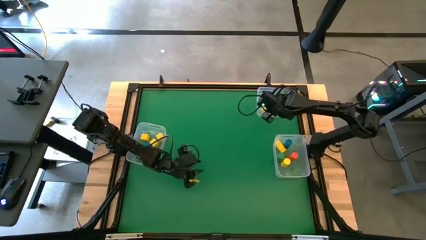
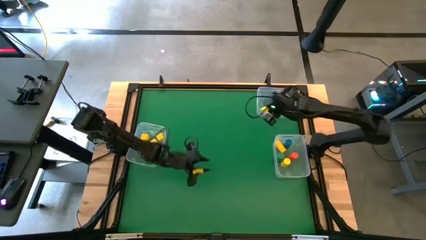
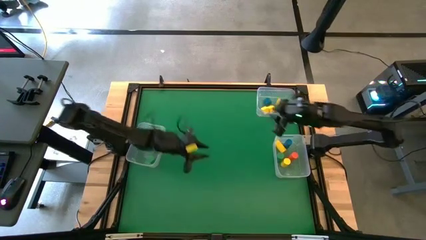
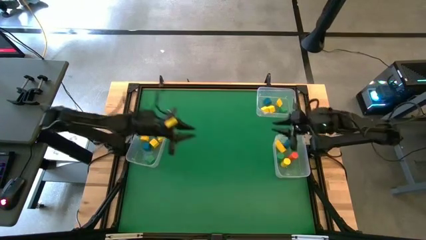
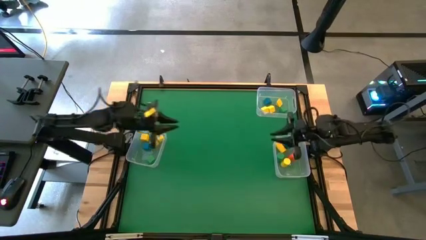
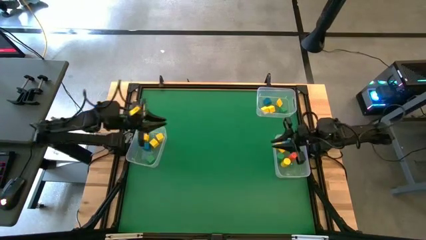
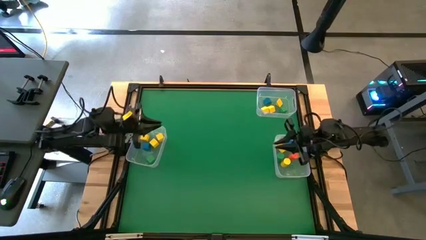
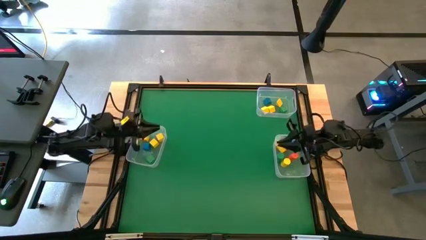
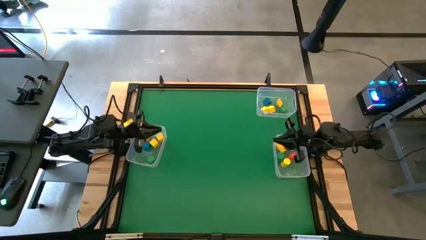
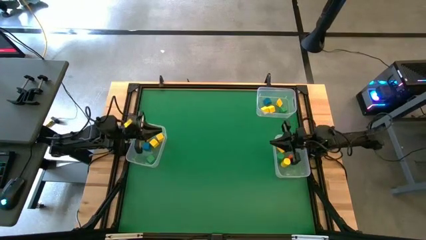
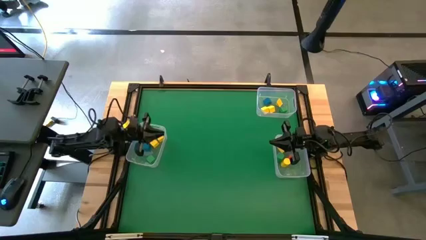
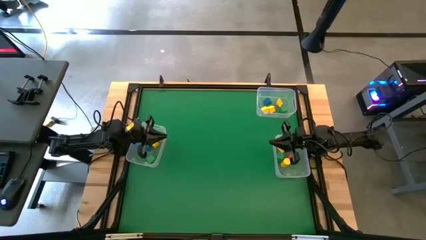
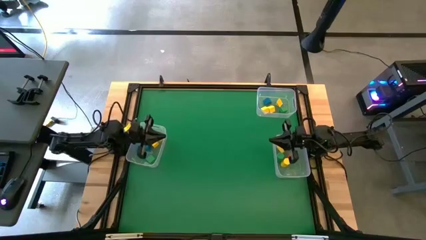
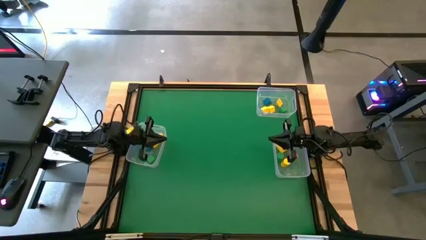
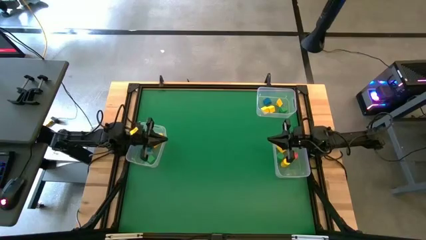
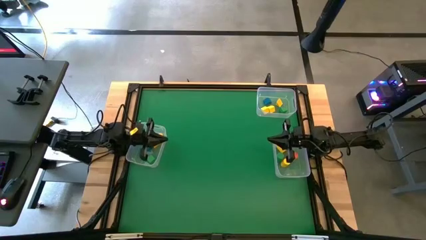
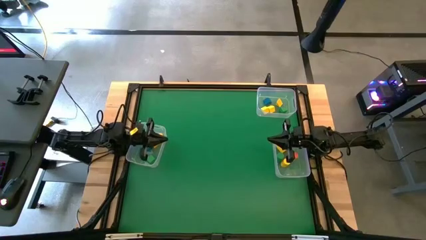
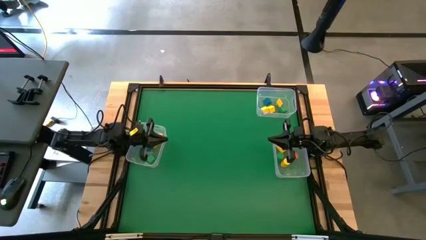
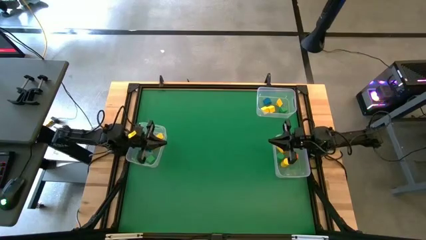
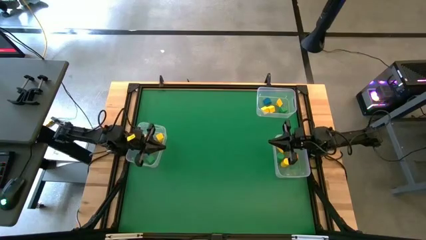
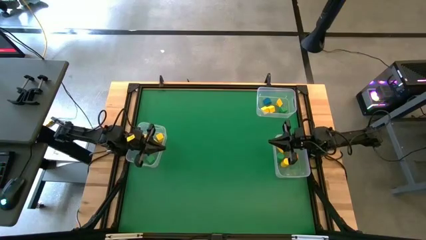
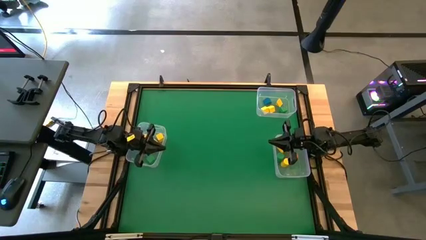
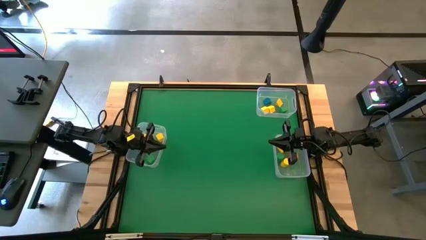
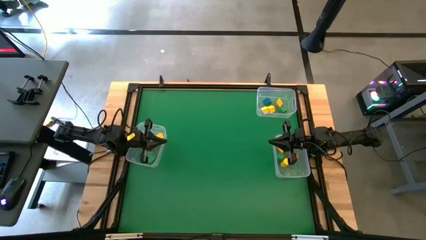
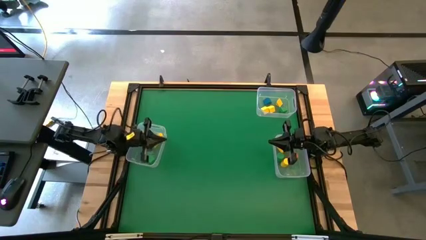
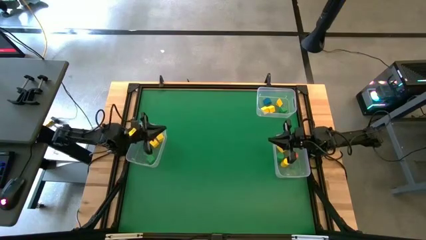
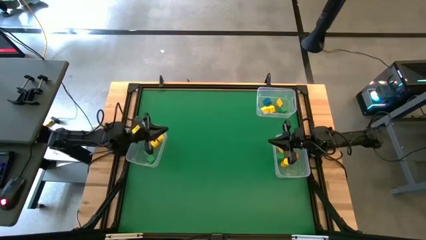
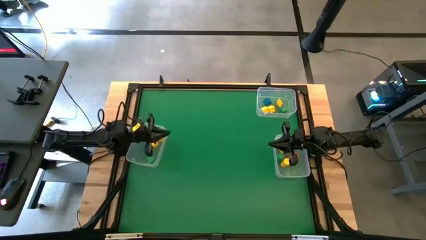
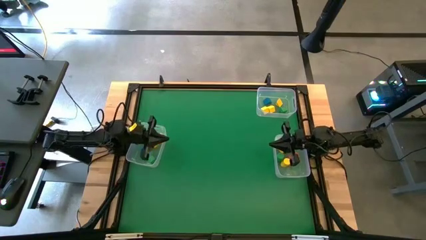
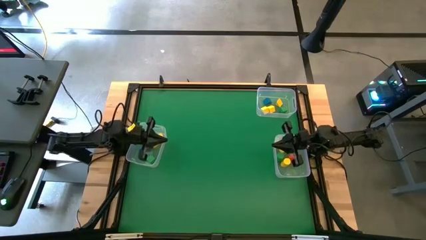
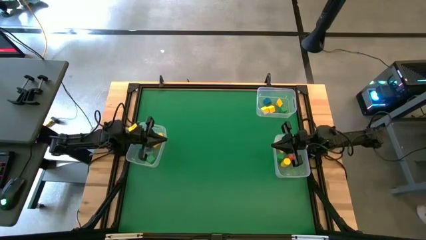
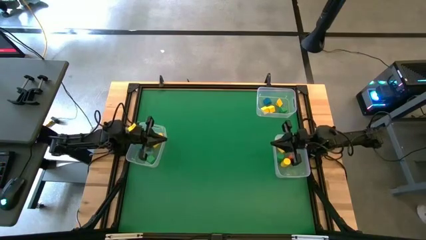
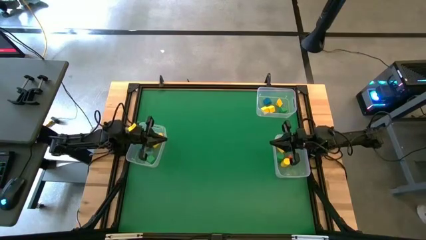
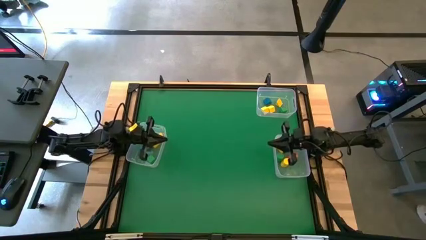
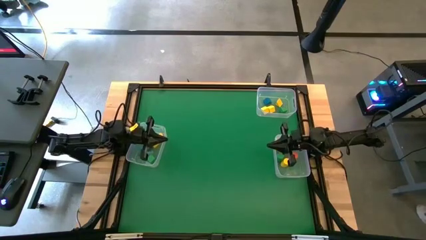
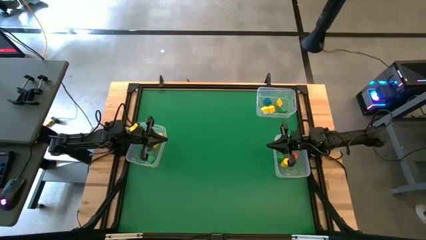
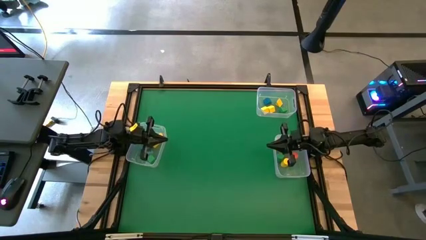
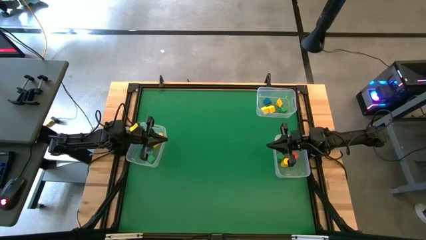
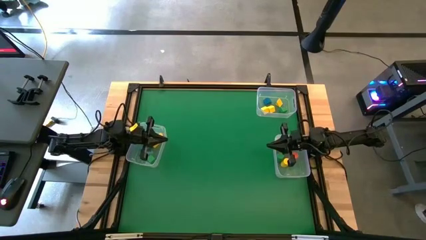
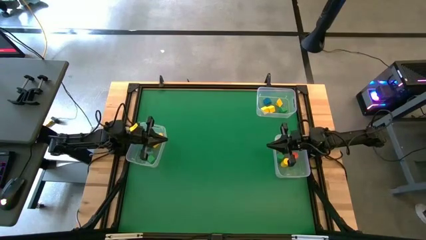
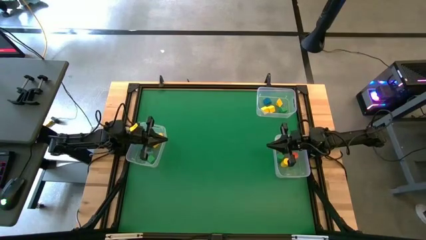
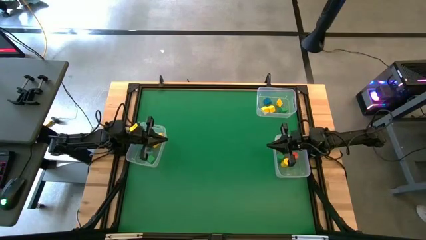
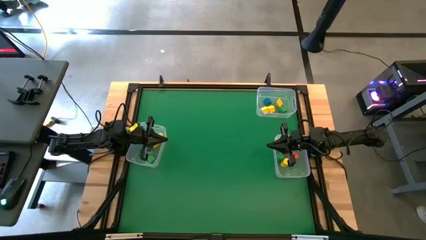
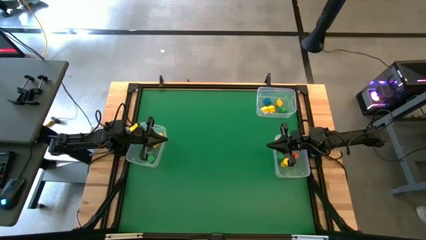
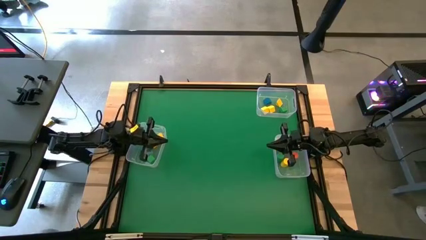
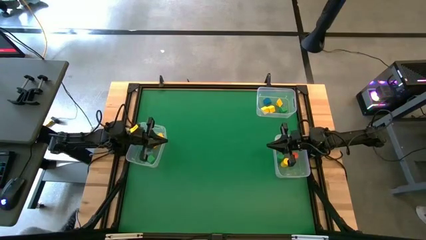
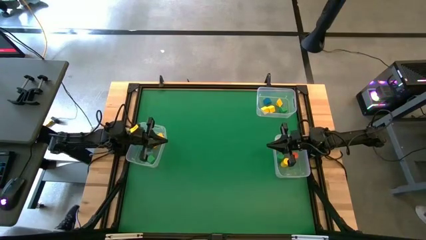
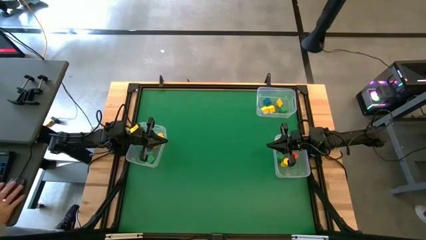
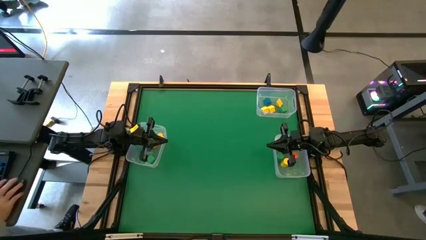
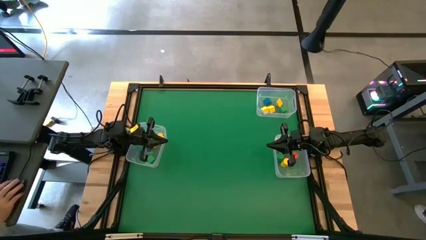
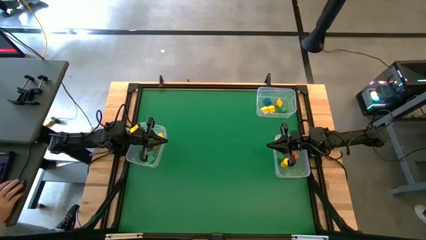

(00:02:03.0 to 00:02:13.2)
Task: Sort blocks by size
Return to Home Position

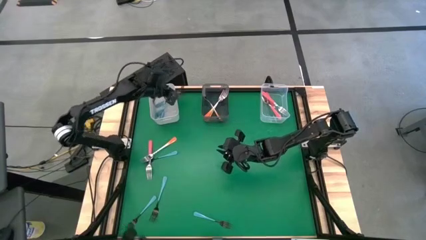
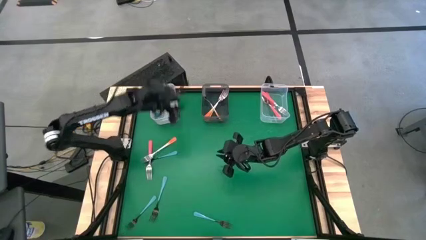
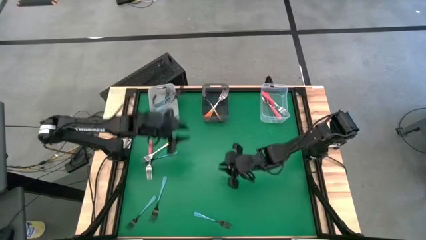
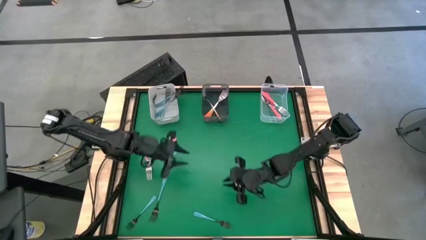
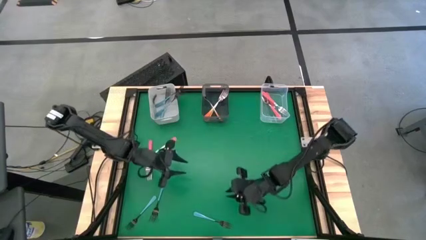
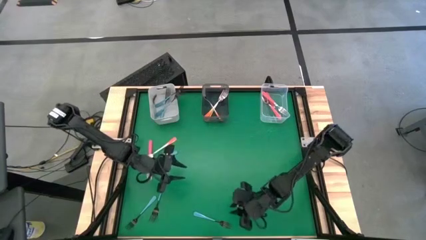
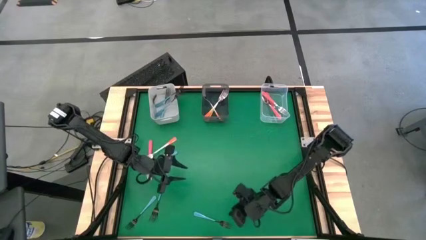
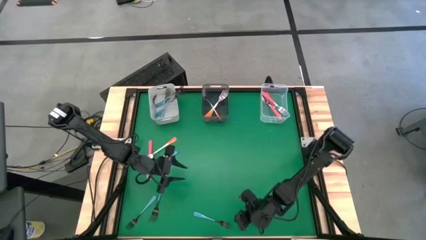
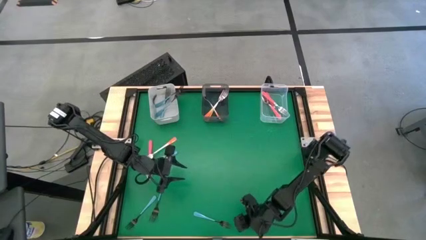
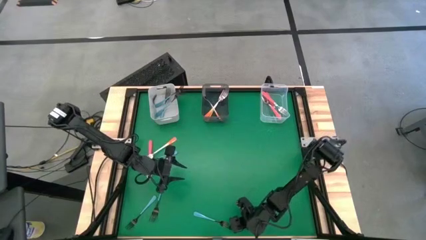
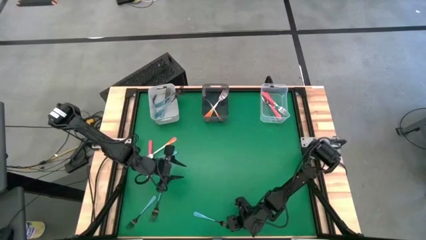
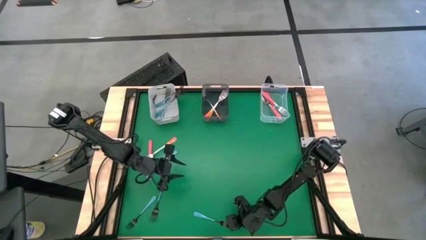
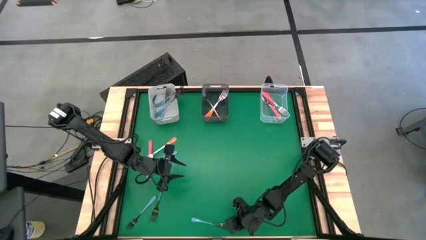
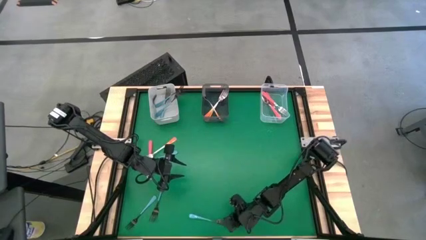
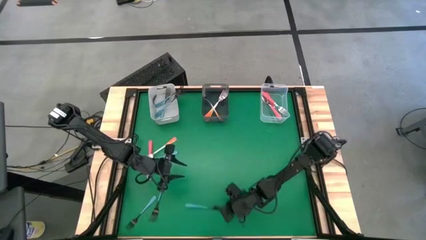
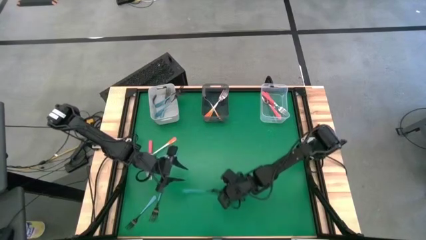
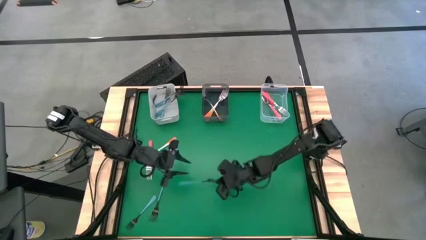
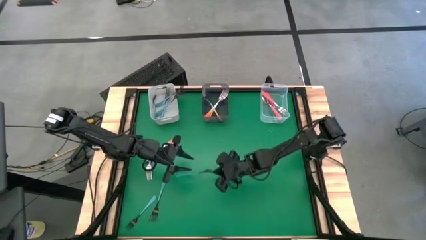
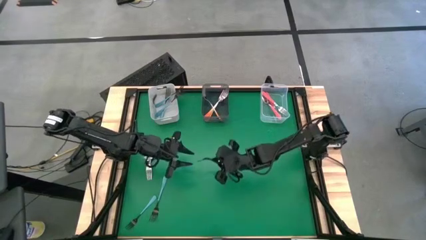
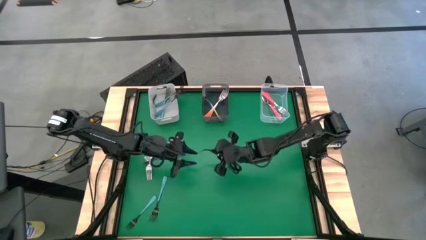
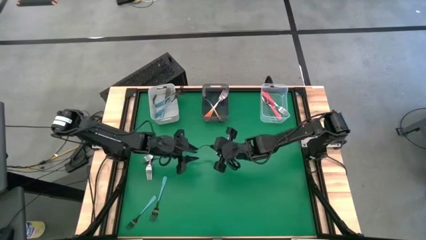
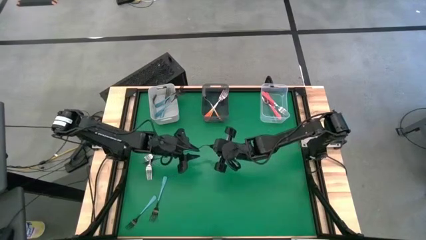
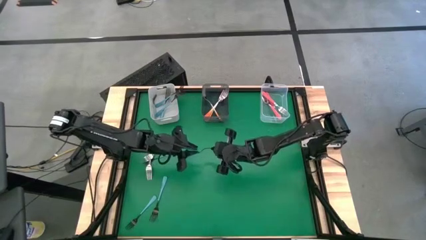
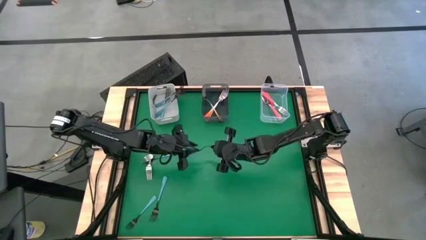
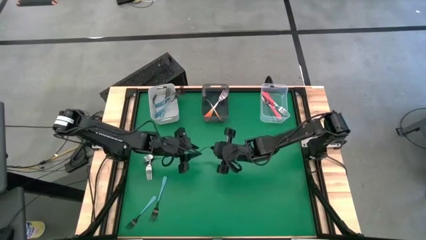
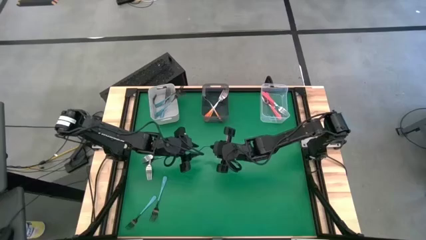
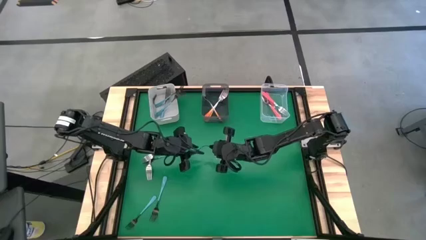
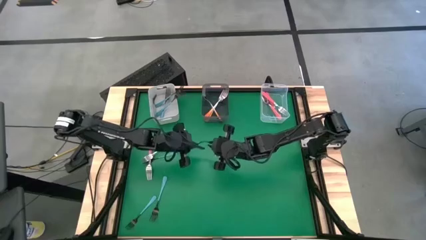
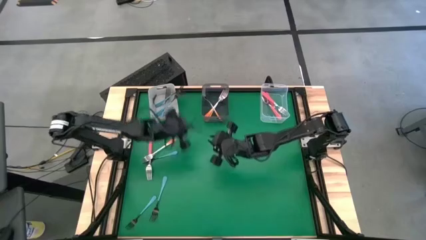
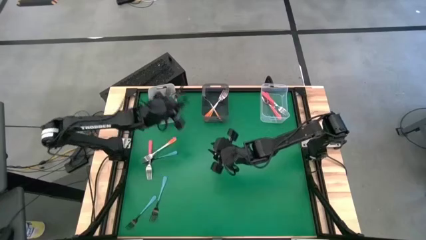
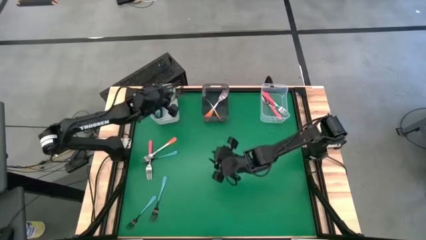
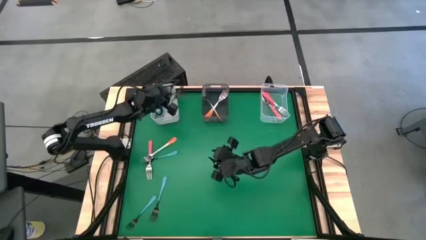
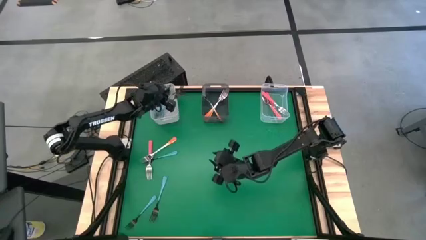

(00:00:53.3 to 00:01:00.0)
Task: Sort silverware by color (type)
Put the blue fork into the white bin
